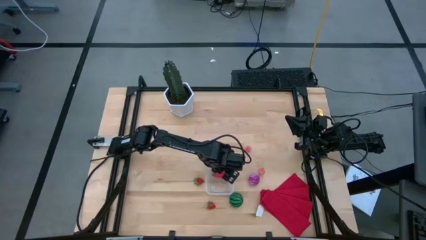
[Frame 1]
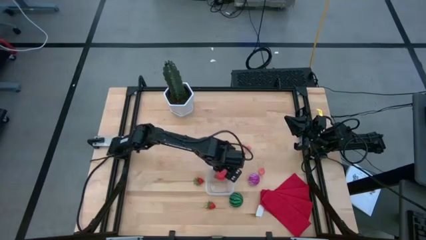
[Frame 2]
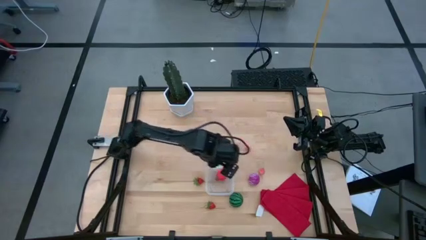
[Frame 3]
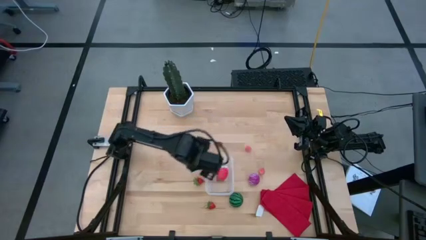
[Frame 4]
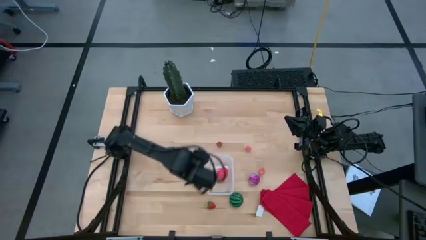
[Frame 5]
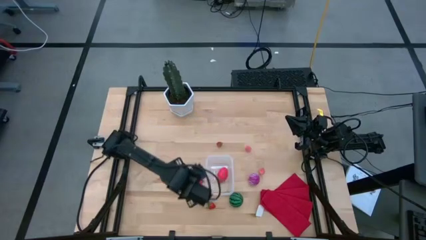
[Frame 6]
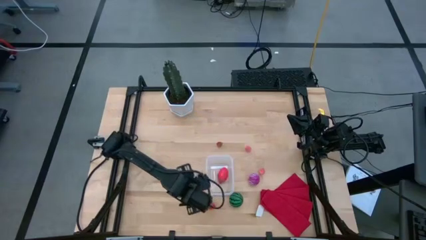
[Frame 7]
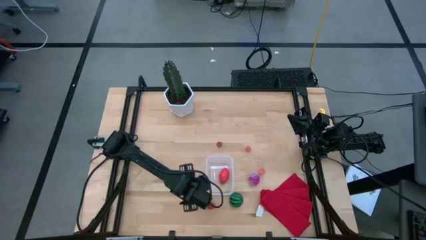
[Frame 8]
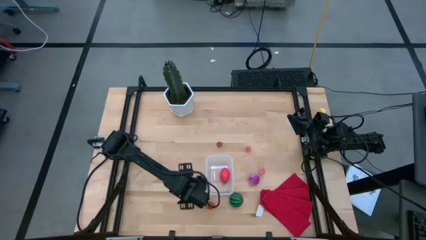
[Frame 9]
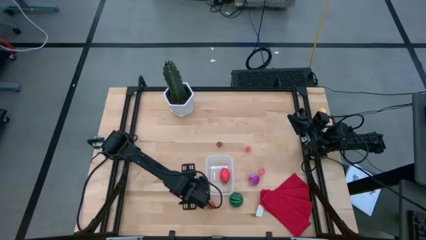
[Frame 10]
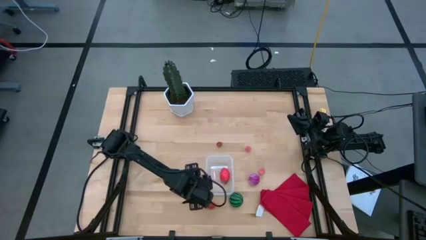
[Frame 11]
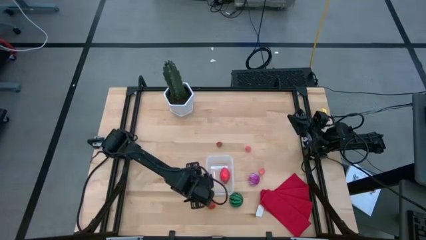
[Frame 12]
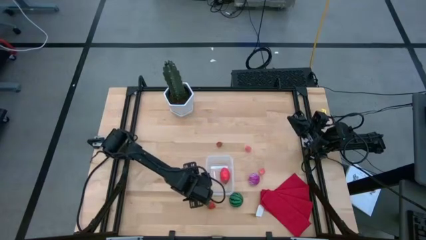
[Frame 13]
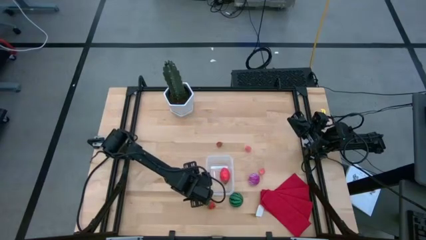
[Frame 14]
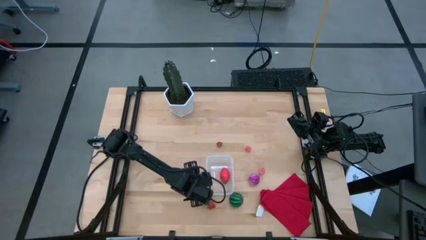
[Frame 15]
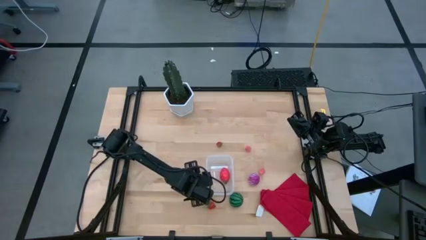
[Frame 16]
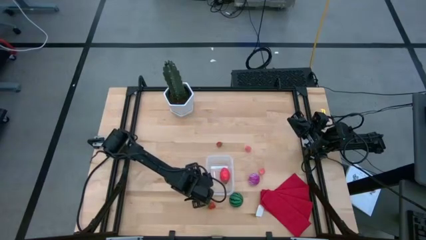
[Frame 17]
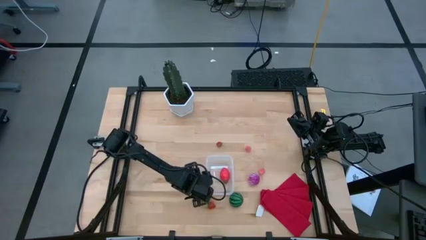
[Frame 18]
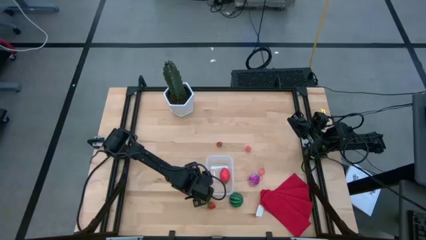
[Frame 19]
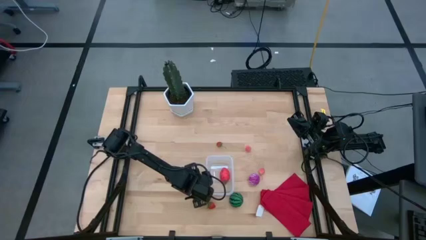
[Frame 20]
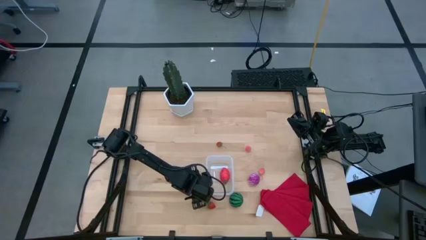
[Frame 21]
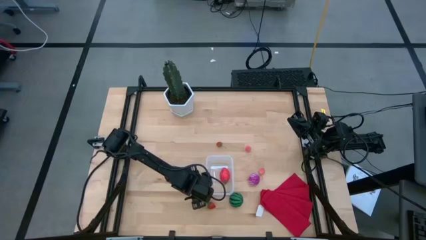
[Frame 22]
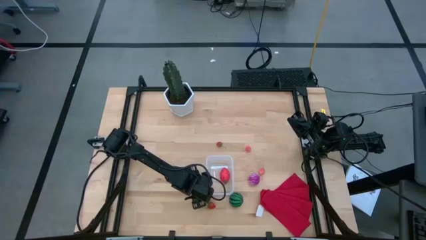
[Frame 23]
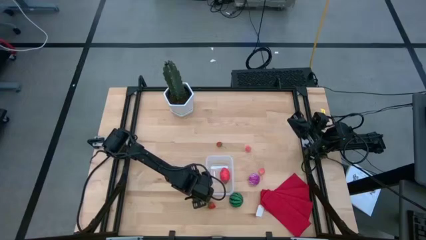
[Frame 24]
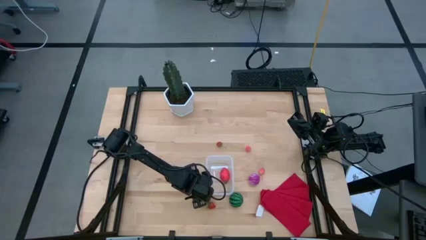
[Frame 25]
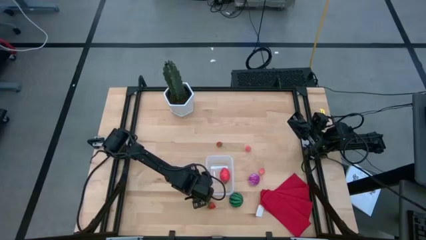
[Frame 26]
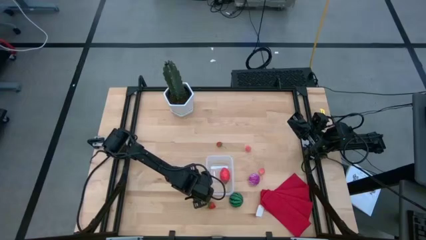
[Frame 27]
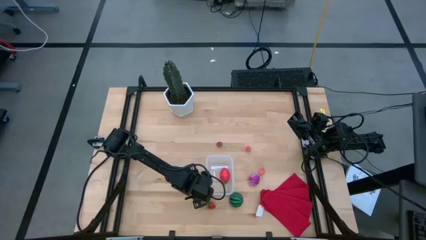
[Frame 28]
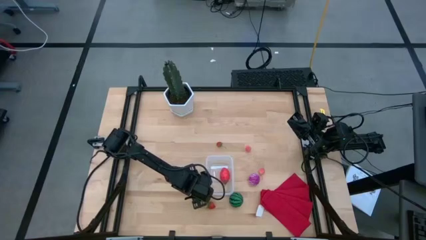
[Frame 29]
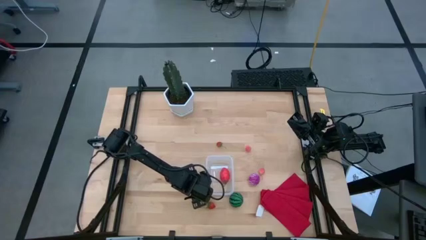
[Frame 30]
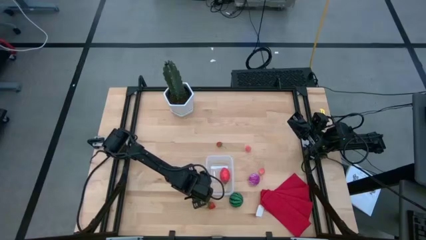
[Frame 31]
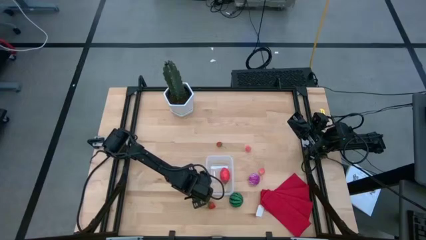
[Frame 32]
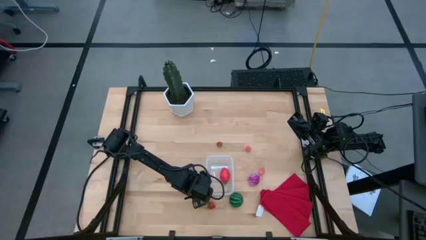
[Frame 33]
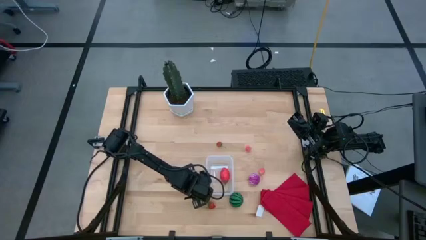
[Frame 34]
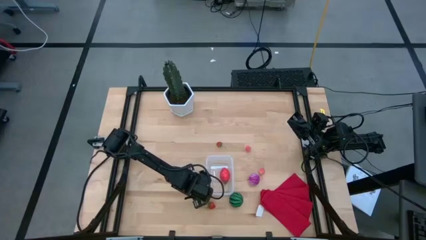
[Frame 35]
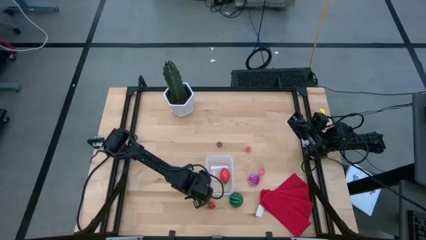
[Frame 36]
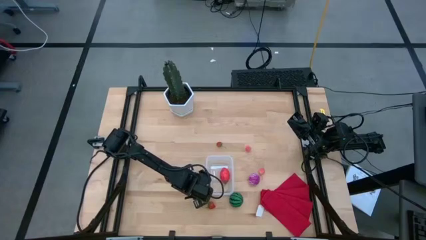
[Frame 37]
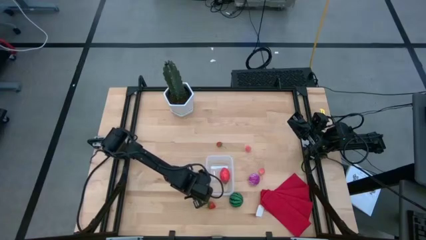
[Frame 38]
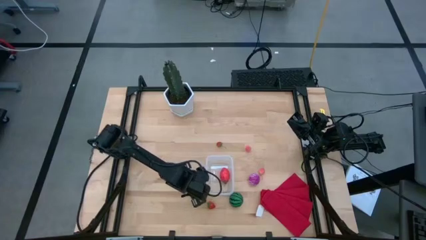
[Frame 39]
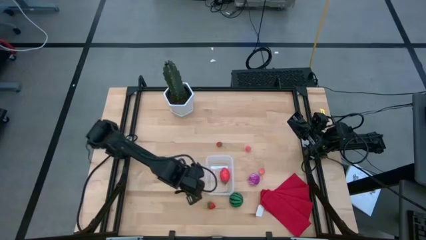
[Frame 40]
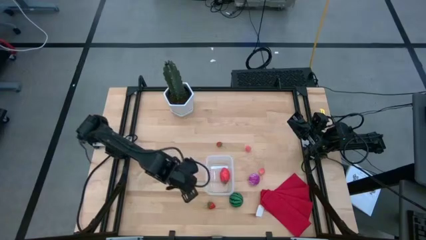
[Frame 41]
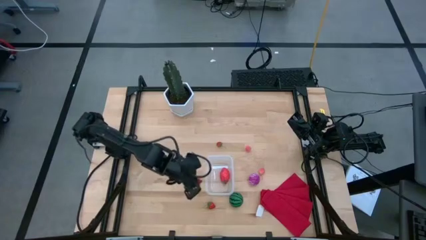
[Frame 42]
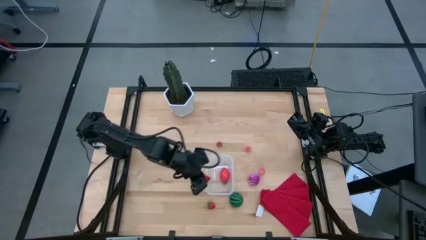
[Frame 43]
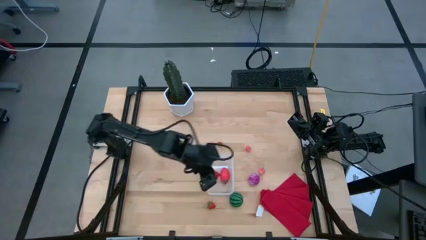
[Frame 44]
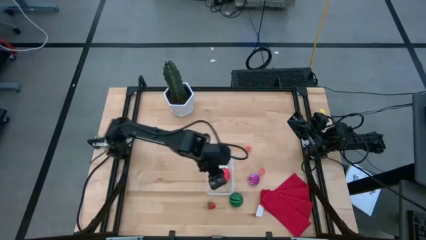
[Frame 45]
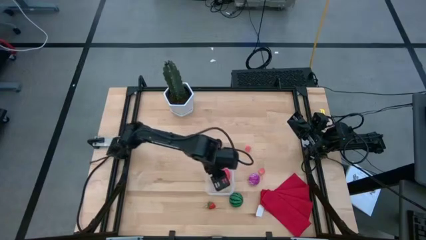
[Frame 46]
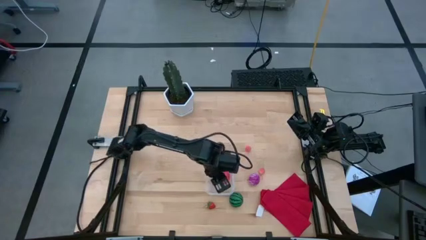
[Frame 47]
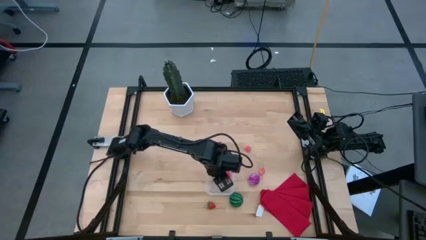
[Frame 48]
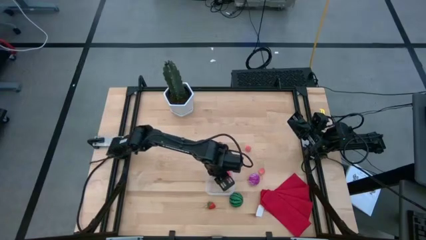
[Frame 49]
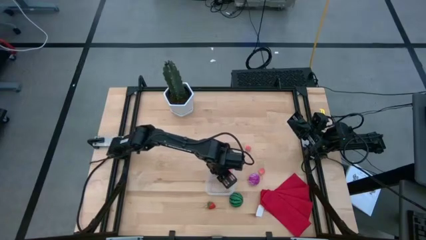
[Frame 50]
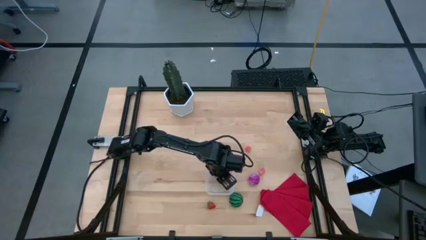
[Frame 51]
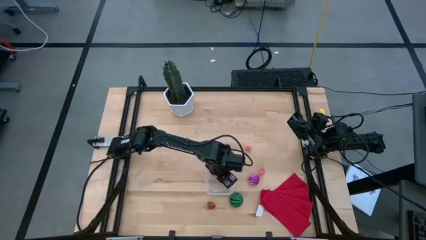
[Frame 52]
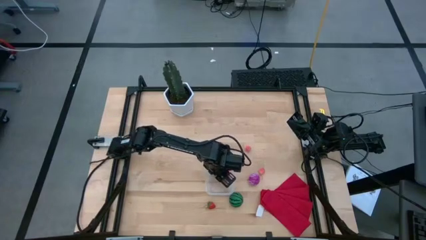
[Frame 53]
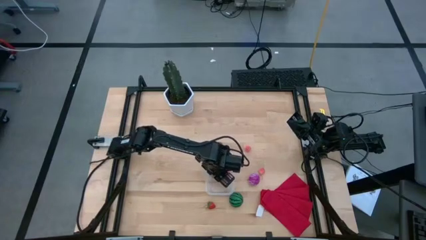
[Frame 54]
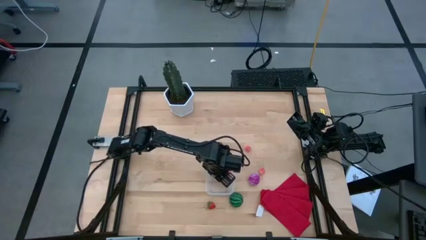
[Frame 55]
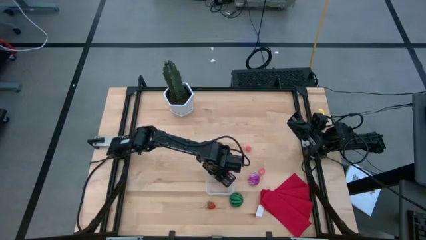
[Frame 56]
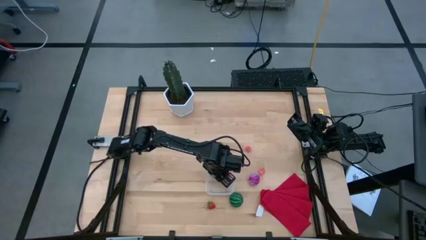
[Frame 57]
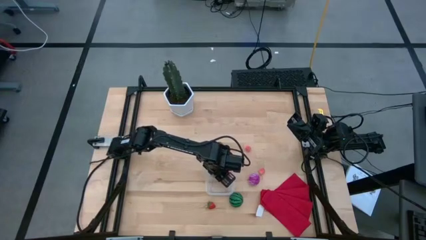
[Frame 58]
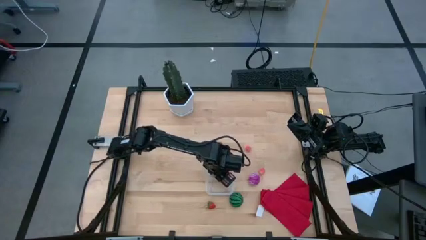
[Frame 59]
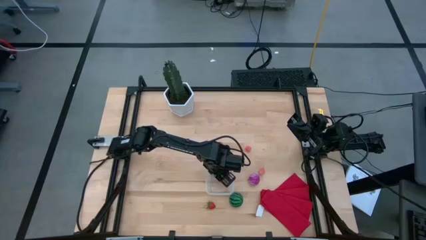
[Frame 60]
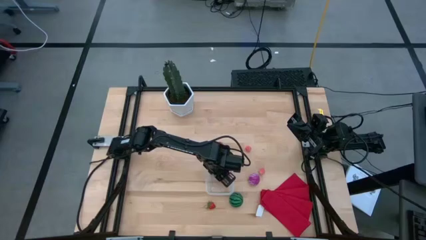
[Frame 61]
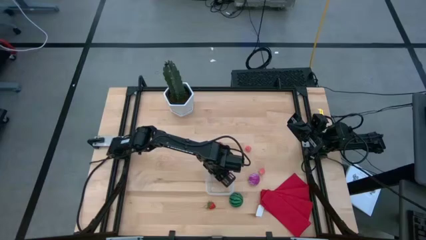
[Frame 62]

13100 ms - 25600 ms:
Task: Pick and placing Produce into tupperware
Put the middle strawberry into the transparent bin

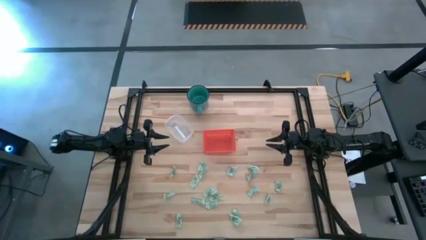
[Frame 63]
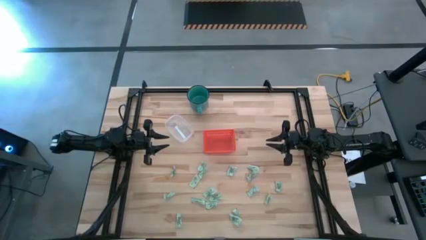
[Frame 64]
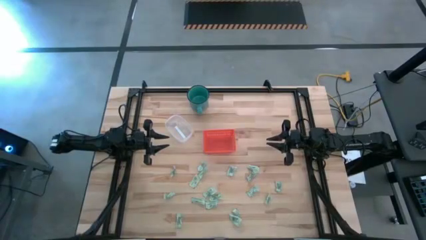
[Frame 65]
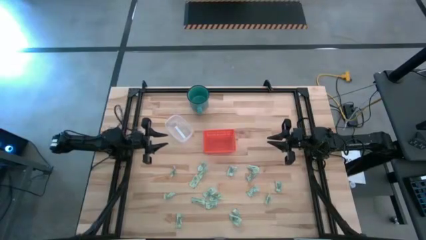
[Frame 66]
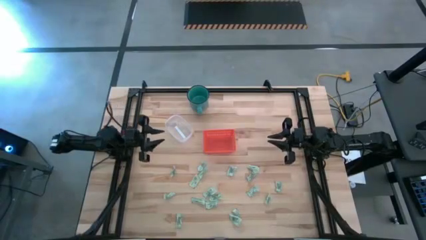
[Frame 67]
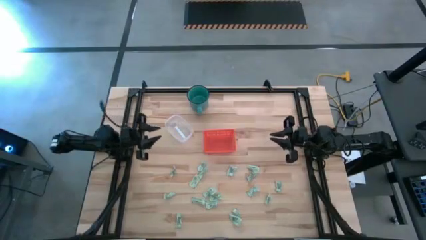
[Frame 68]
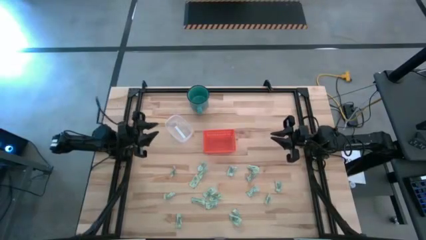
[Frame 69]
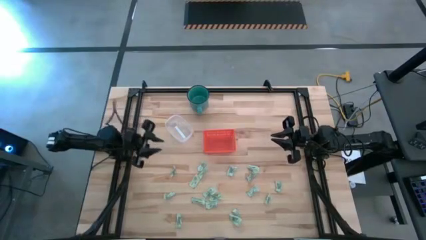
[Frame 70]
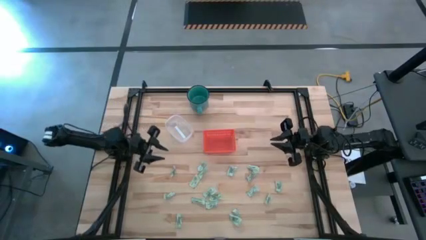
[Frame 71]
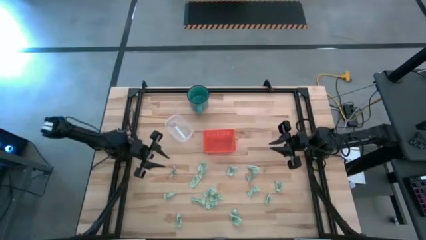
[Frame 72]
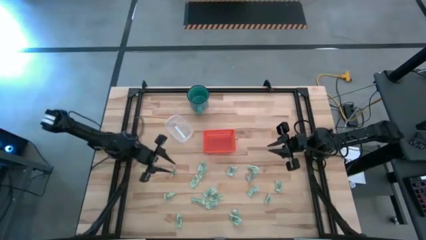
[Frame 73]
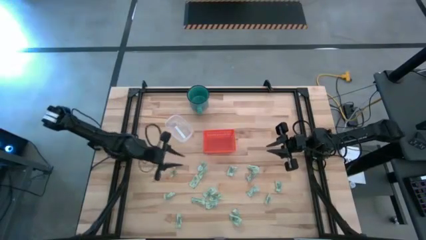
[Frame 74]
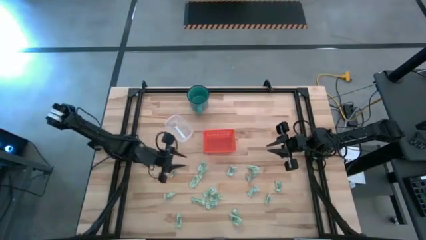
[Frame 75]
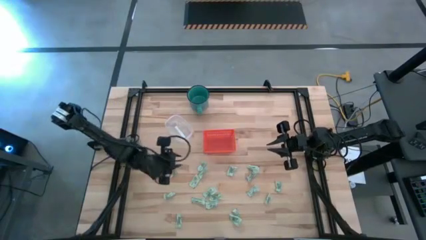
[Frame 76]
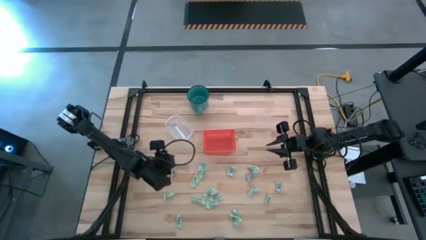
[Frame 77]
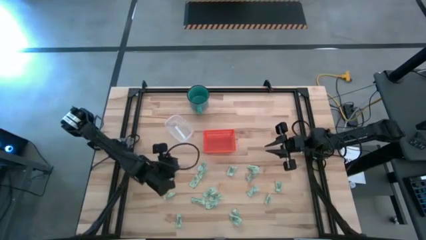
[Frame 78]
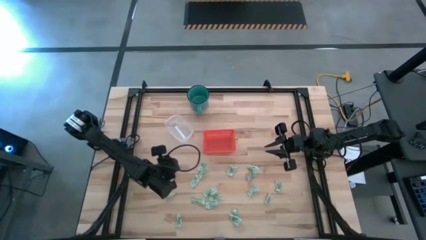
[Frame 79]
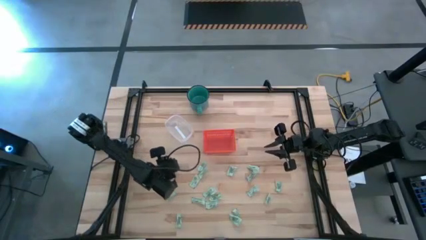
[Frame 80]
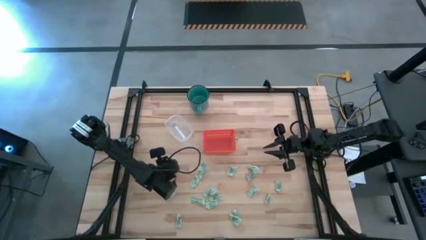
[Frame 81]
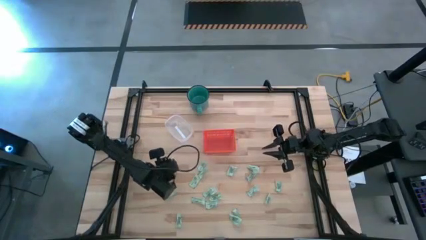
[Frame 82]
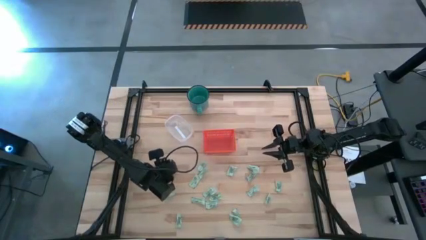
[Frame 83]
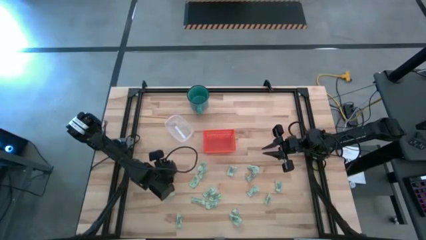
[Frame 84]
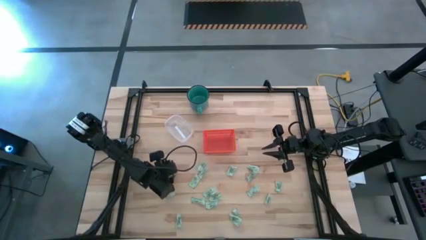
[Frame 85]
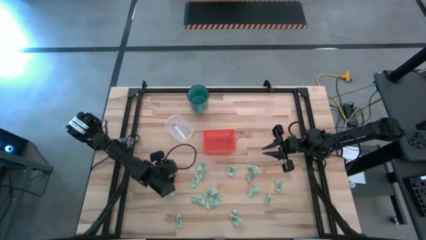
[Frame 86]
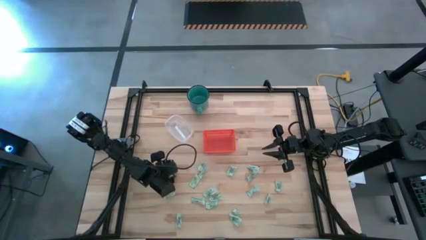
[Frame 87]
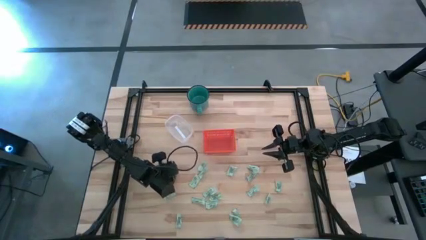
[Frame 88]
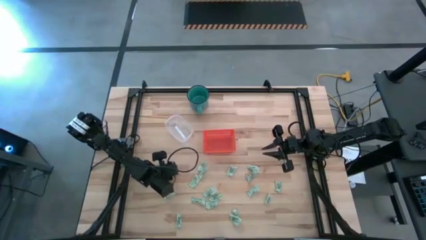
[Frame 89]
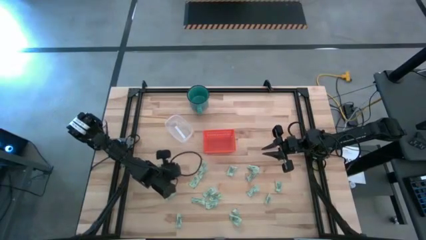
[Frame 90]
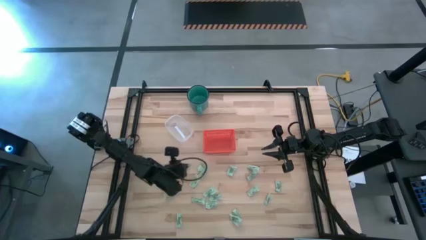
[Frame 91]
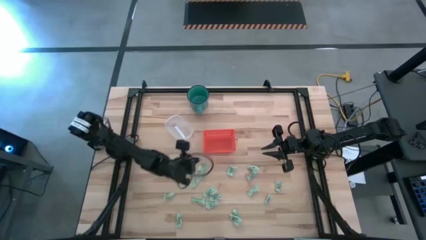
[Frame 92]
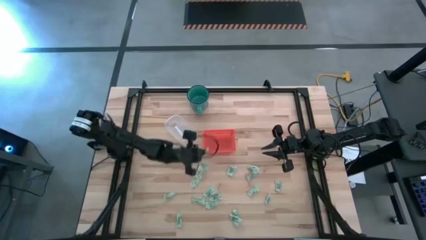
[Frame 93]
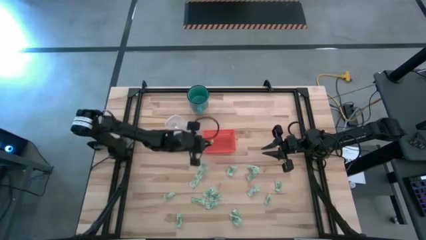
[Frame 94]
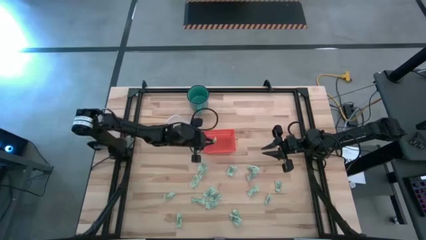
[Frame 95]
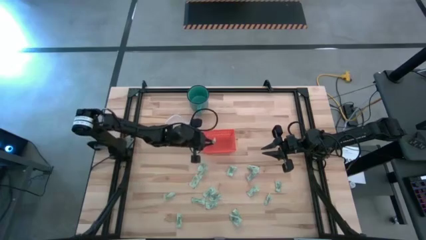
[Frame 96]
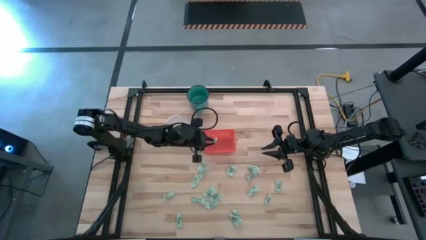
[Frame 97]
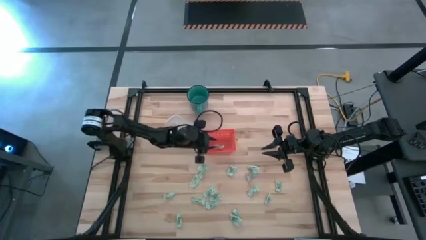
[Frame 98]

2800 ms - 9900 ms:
Task: Pick and place items into bin
Put the stevia packet into the orange bin
